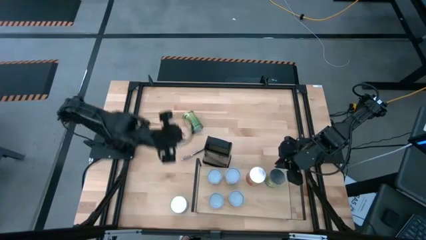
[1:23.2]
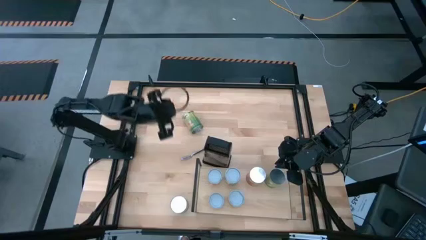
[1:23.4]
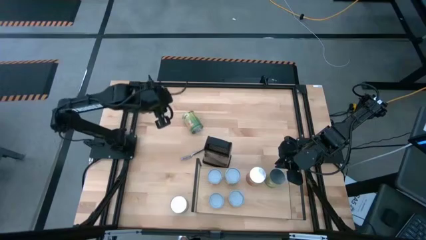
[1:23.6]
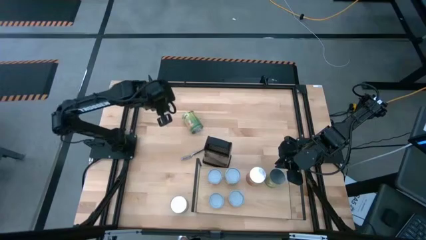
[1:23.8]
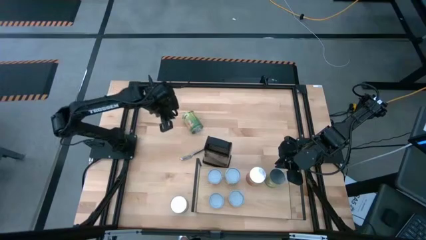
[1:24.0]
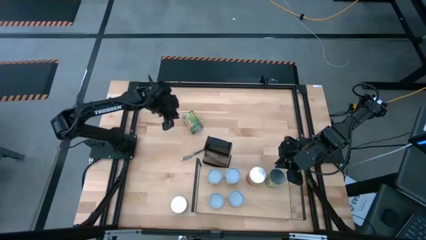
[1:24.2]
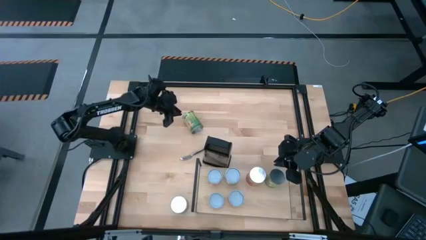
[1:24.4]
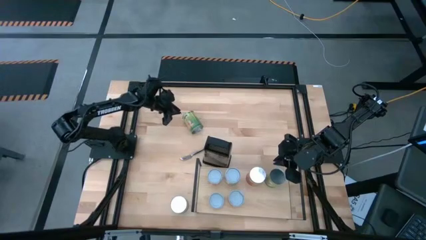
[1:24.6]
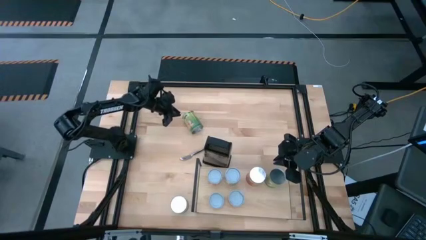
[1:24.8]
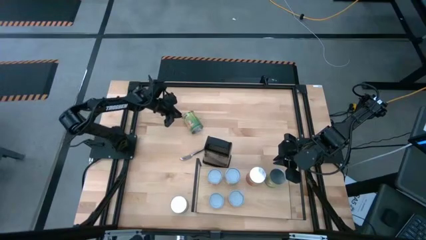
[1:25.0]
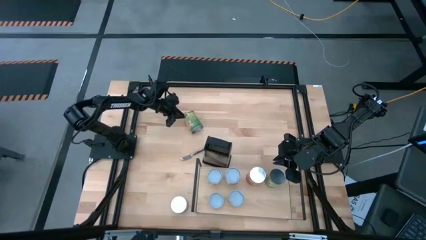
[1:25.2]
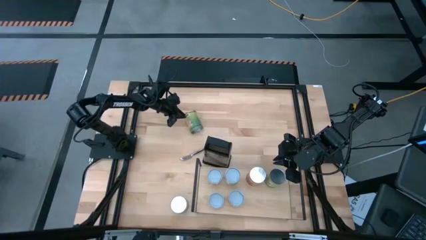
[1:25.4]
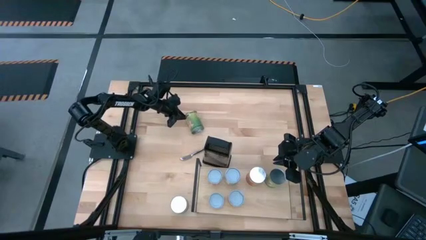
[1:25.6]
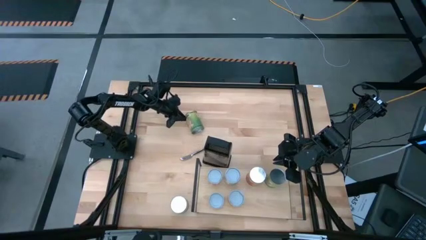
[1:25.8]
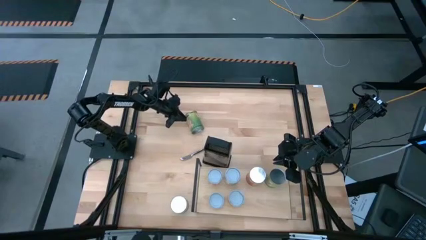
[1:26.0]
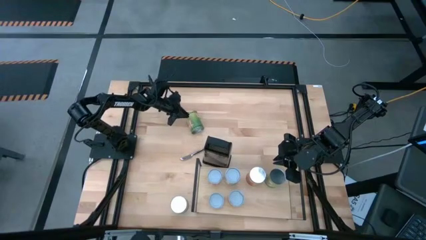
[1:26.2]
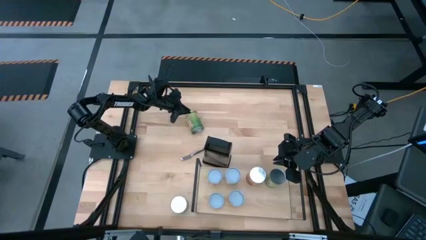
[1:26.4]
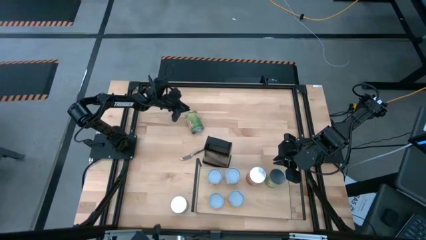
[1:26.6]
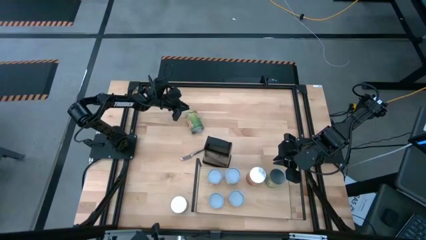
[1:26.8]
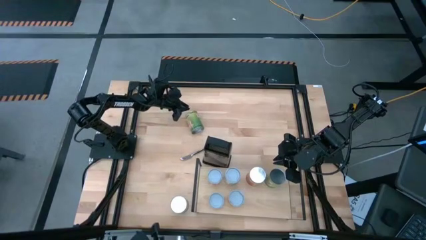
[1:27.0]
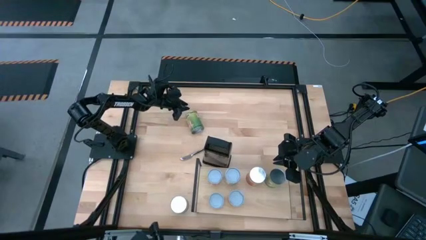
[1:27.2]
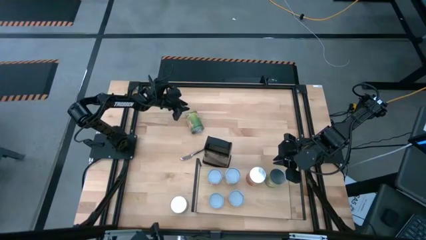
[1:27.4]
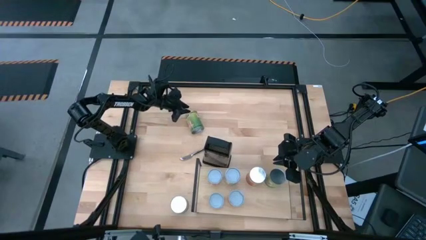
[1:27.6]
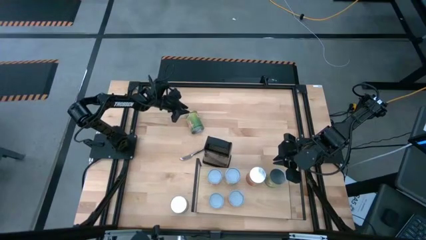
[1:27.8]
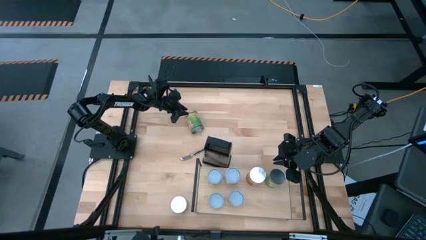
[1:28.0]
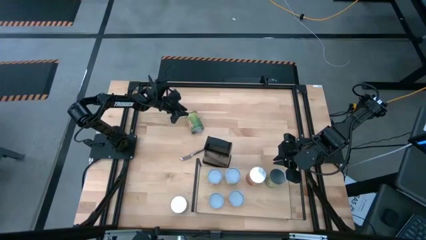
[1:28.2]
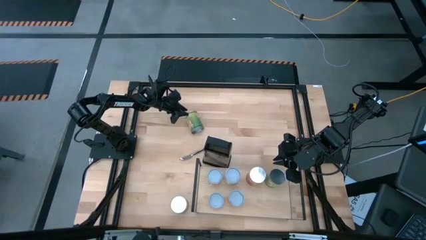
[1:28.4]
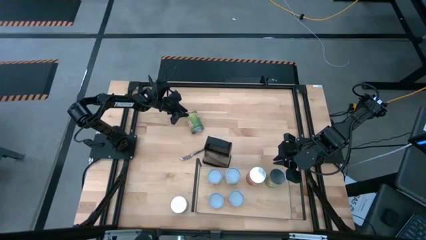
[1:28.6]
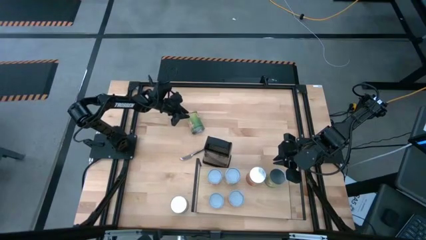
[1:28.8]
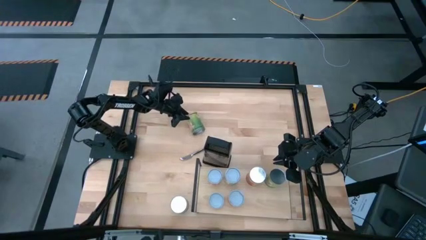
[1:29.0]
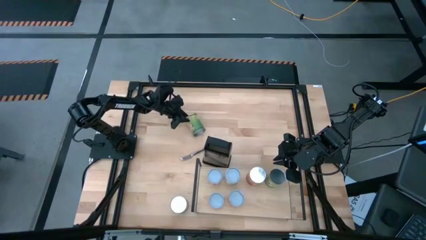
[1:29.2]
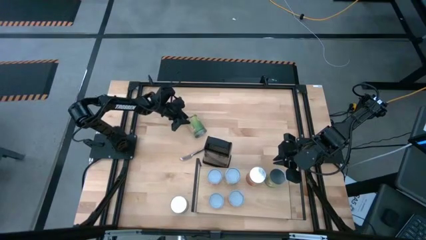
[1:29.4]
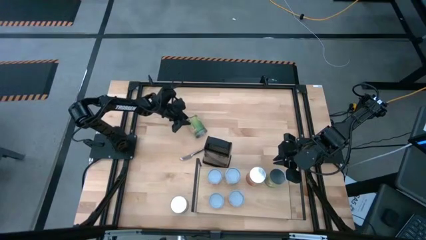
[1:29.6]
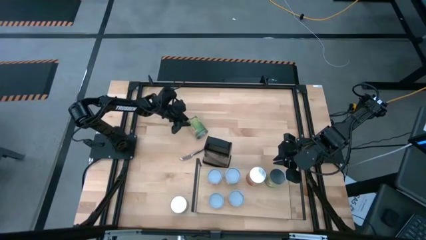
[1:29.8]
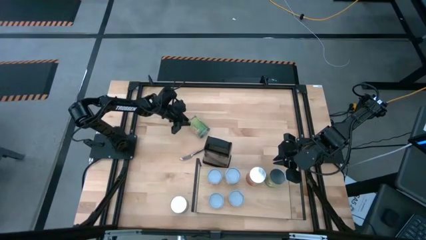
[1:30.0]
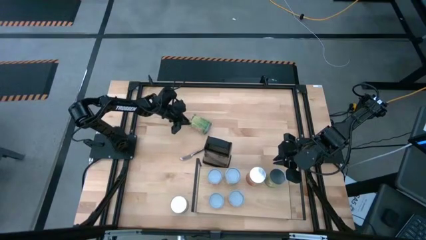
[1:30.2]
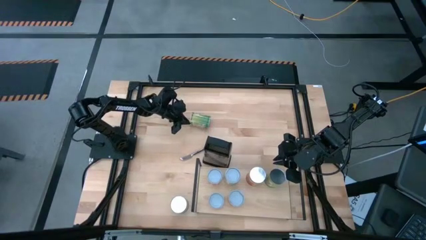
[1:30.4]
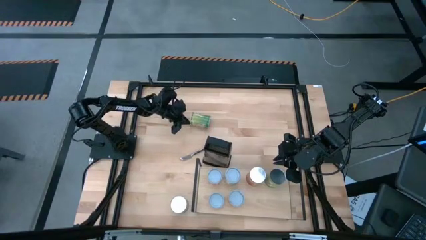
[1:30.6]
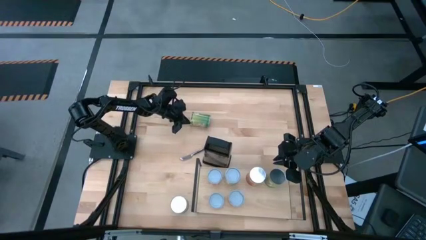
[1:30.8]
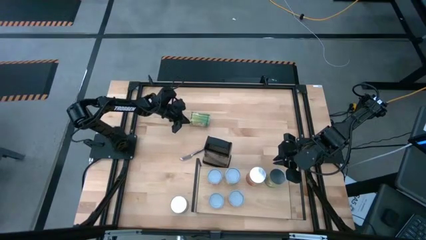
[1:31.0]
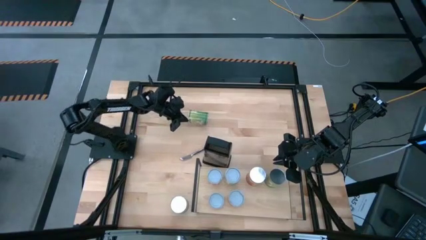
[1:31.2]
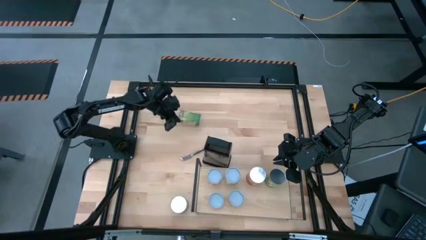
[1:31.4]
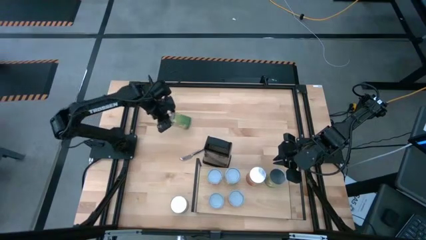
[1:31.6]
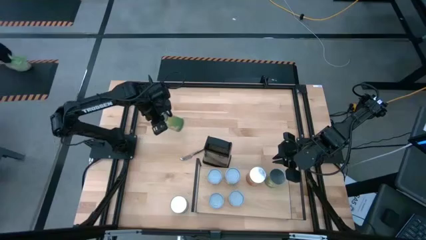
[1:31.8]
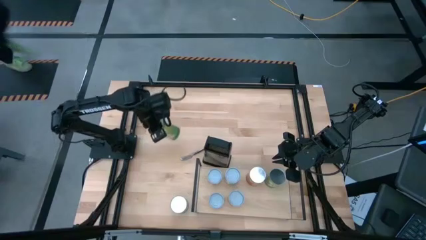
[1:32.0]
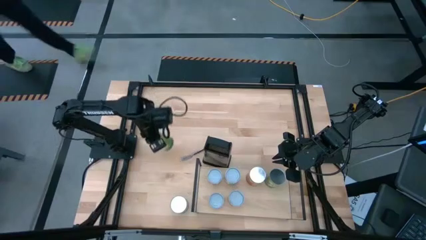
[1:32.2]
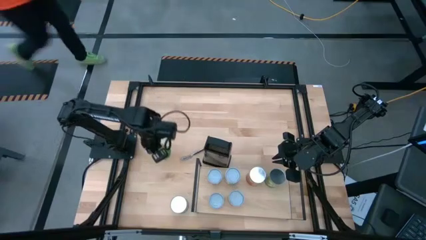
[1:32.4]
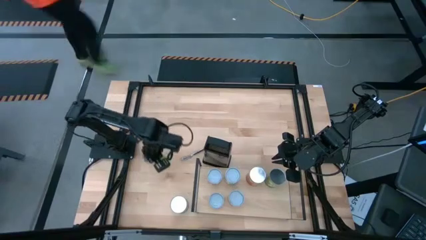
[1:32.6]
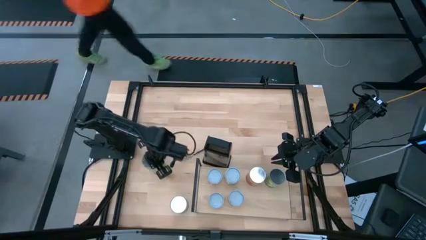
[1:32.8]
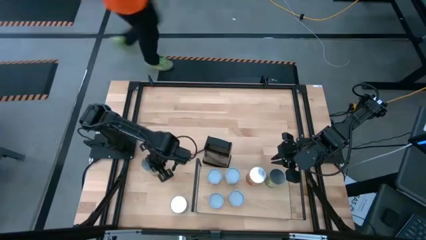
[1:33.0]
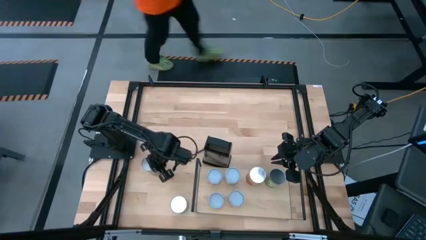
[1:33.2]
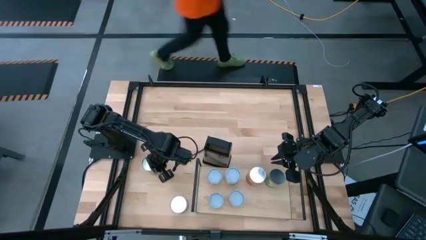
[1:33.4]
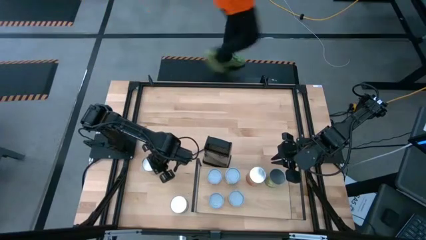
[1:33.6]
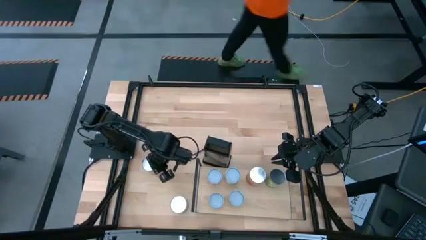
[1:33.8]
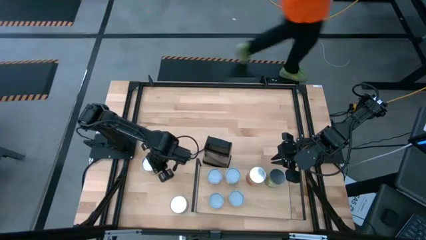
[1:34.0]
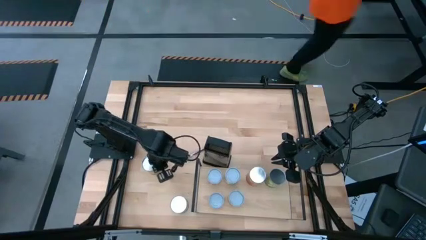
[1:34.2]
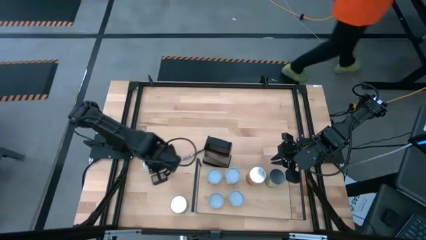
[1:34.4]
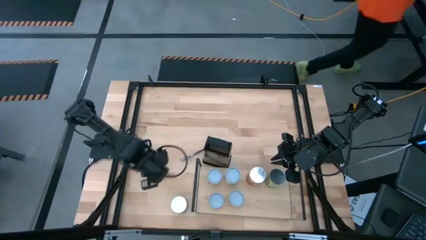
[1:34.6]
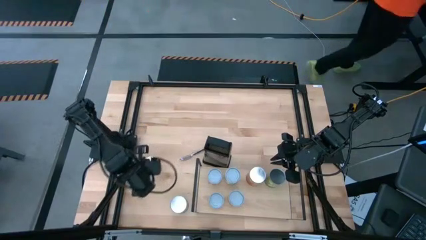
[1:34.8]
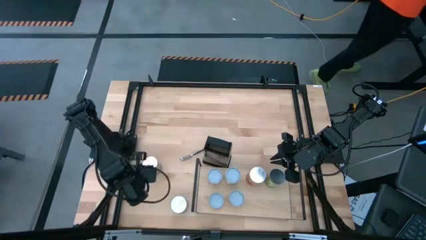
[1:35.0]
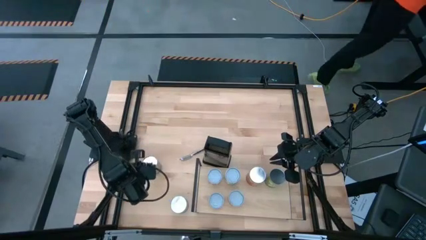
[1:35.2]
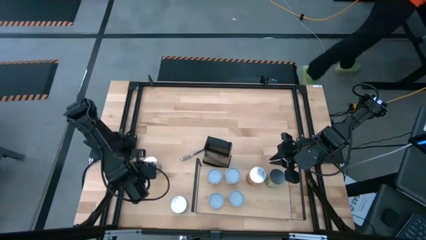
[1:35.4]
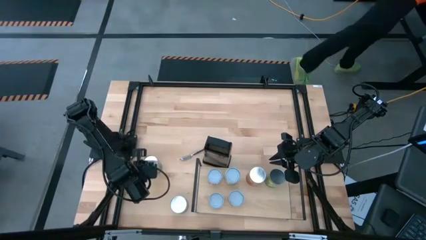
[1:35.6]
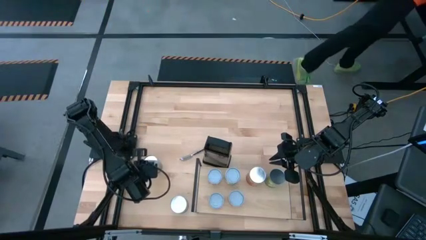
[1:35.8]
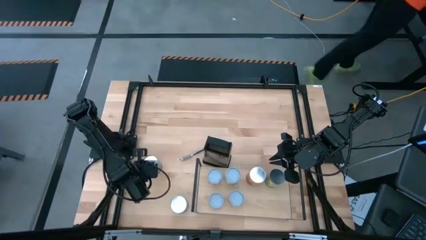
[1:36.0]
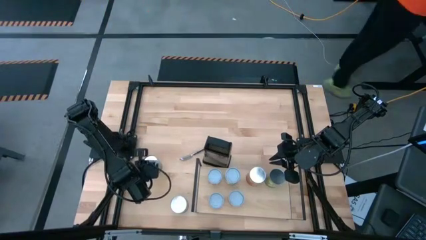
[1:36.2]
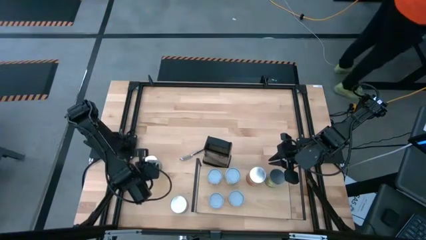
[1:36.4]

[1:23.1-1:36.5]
Task: Pick and place cans onto a shelf
Put the canned oranges on the shelf

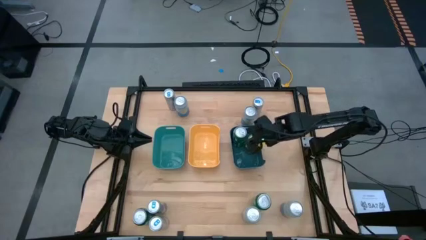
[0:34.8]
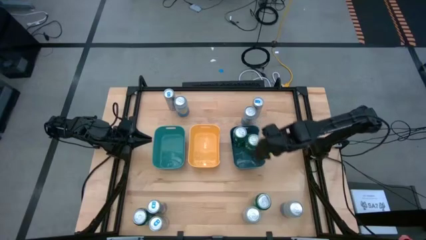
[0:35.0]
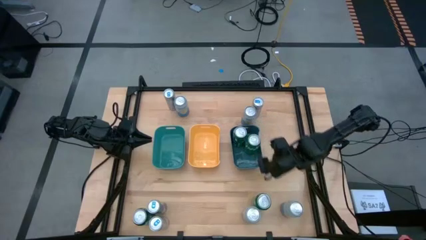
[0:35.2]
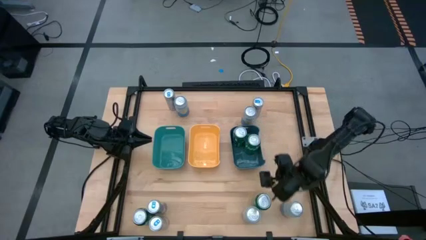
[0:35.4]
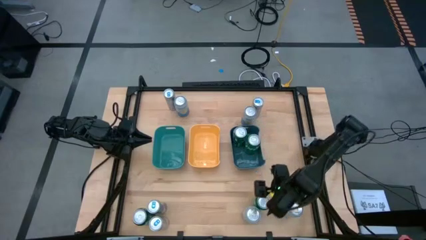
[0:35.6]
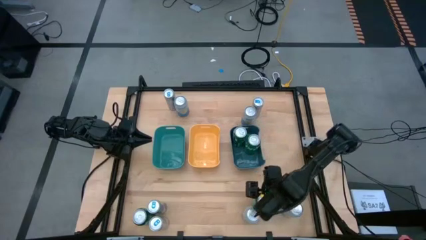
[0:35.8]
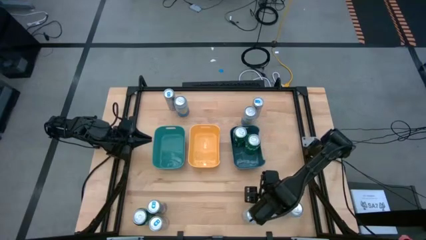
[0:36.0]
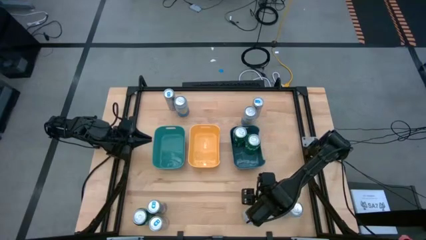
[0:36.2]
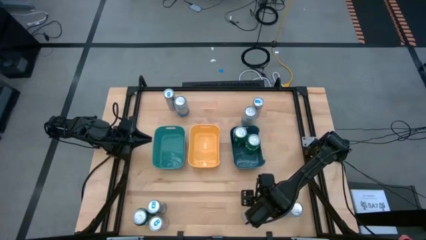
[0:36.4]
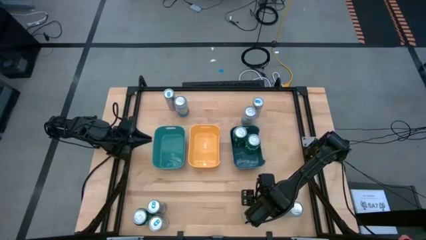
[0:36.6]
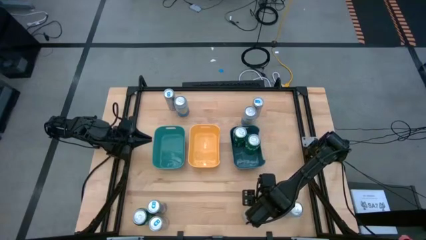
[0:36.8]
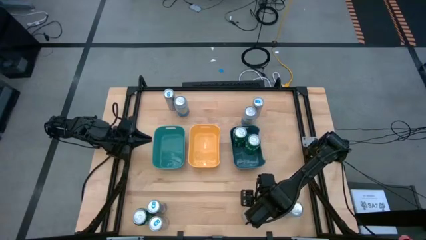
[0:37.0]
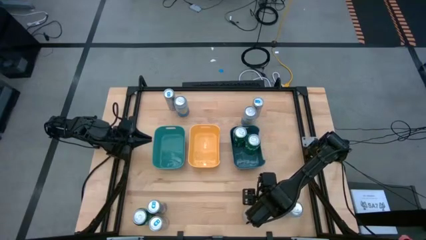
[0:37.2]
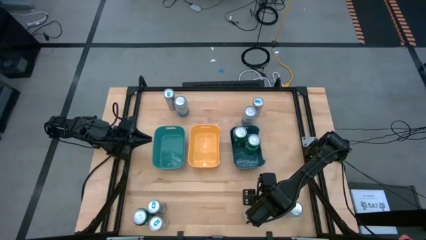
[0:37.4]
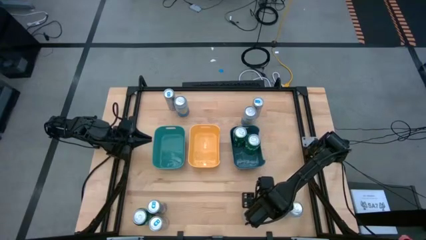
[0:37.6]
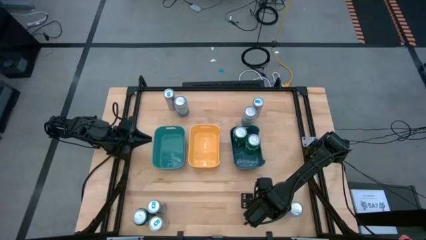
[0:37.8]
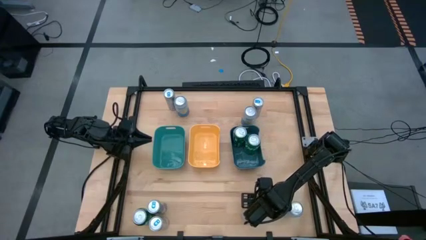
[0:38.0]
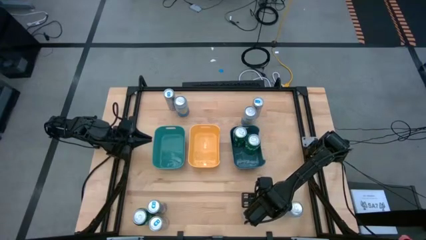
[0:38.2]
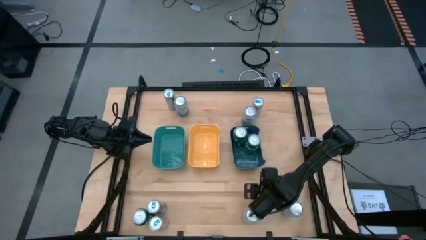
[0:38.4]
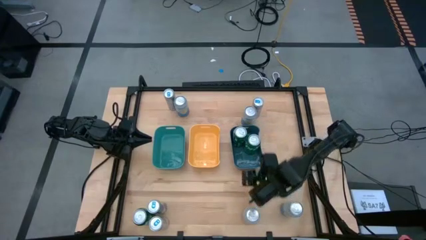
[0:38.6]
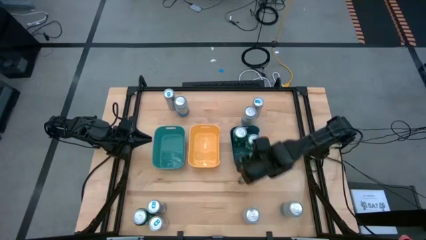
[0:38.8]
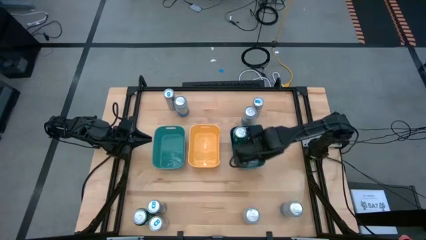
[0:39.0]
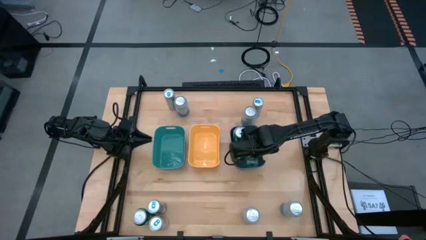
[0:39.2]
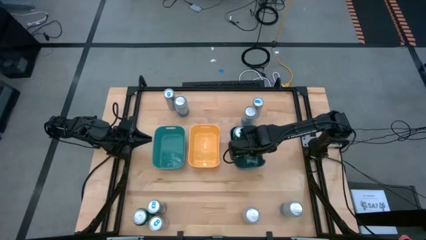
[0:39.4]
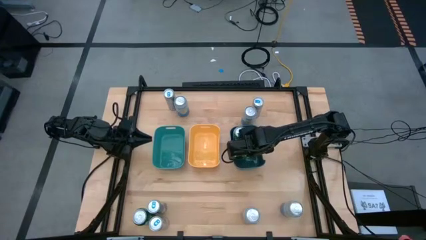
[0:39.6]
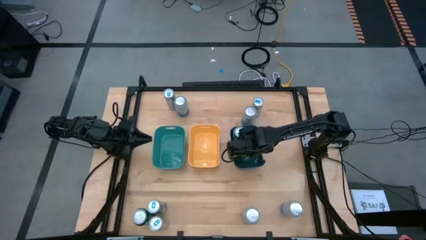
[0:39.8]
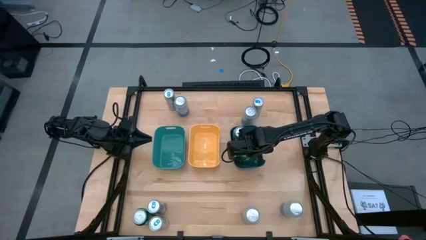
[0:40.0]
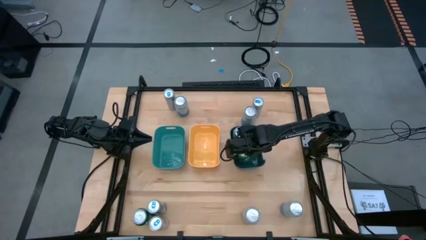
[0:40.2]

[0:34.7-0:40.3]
Task: Sort soda cans
Put the green soda can into the blue bin
